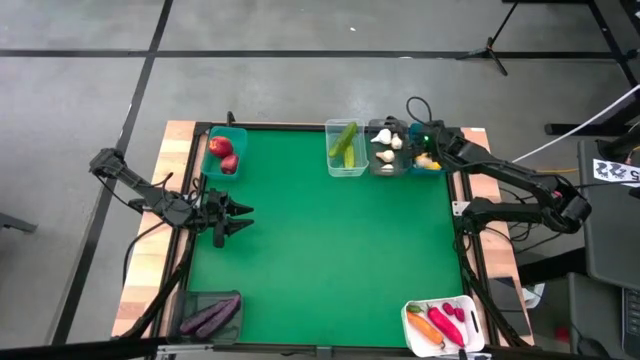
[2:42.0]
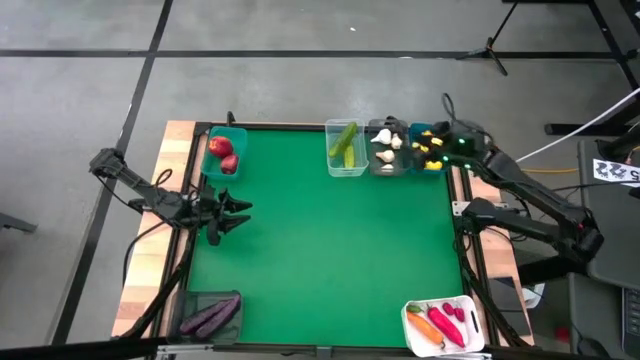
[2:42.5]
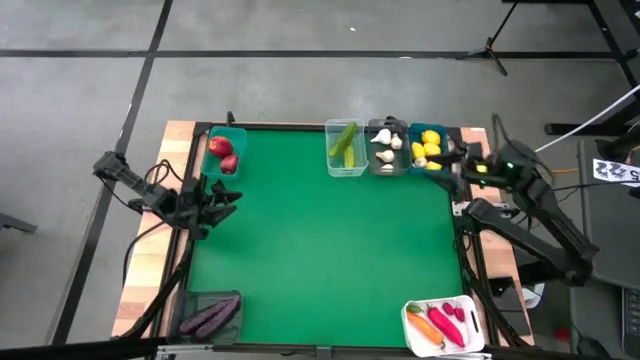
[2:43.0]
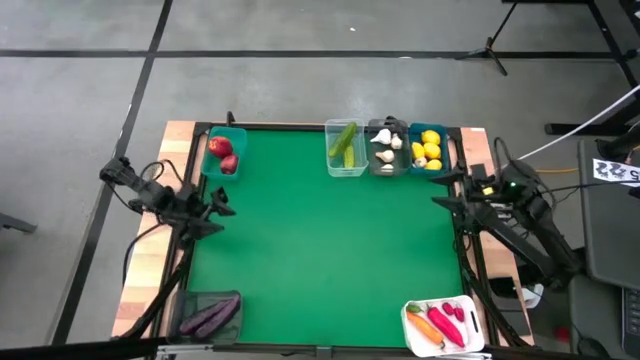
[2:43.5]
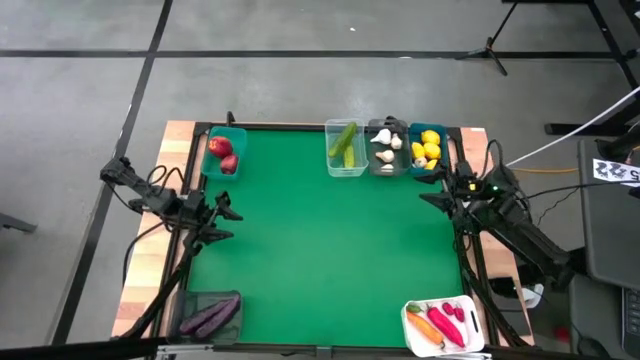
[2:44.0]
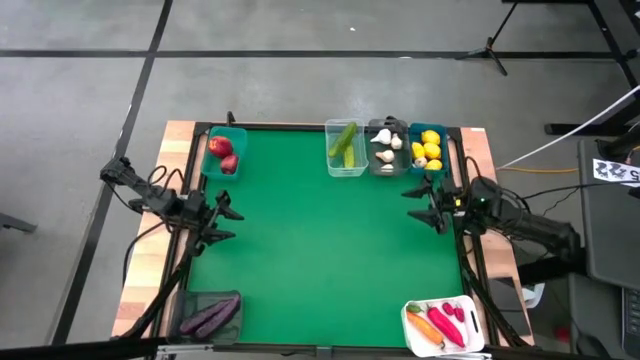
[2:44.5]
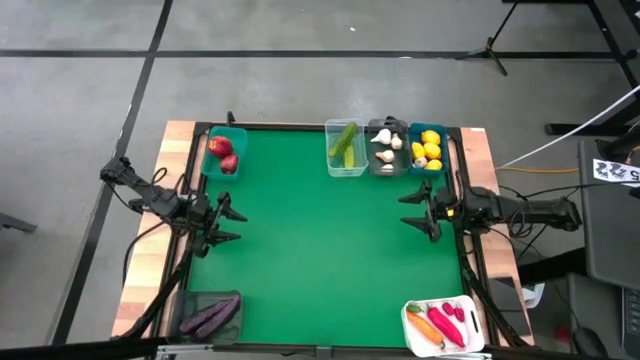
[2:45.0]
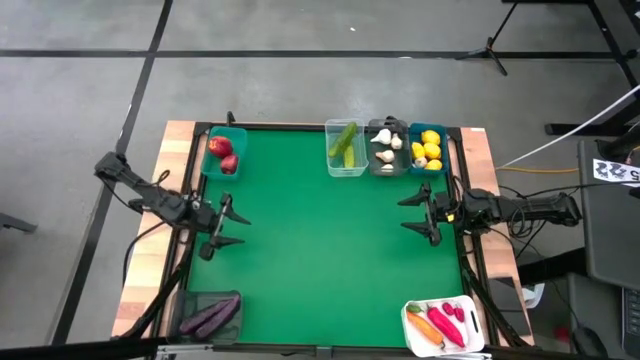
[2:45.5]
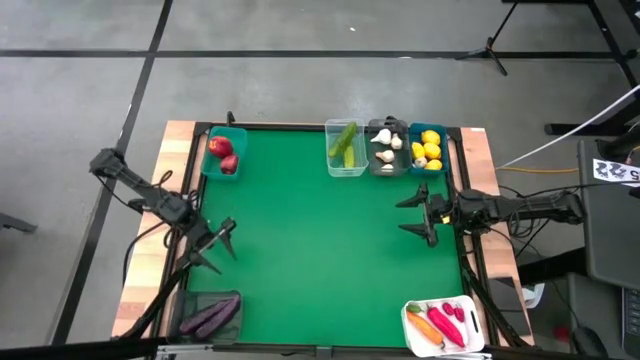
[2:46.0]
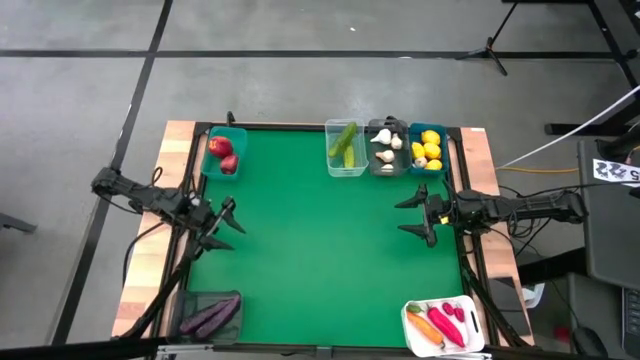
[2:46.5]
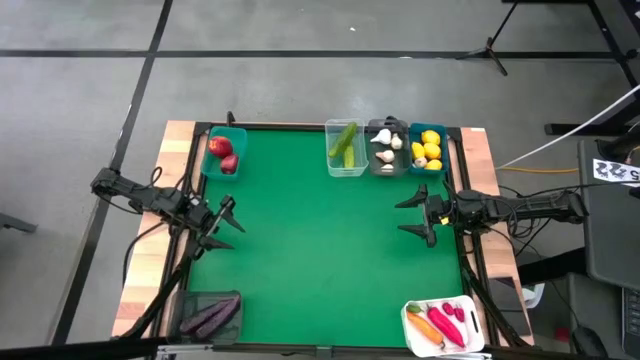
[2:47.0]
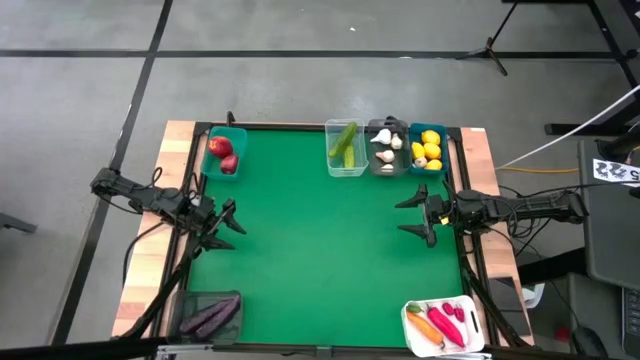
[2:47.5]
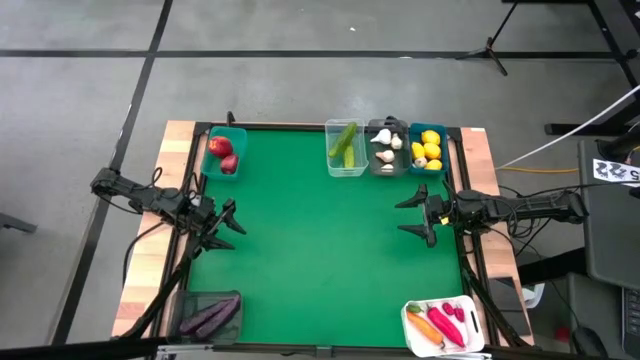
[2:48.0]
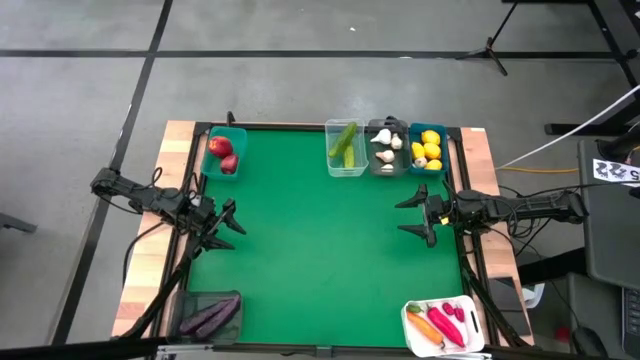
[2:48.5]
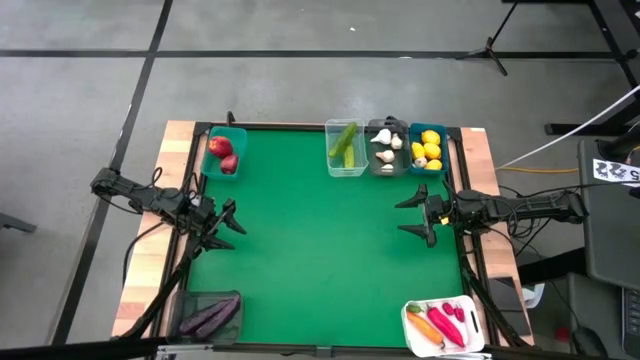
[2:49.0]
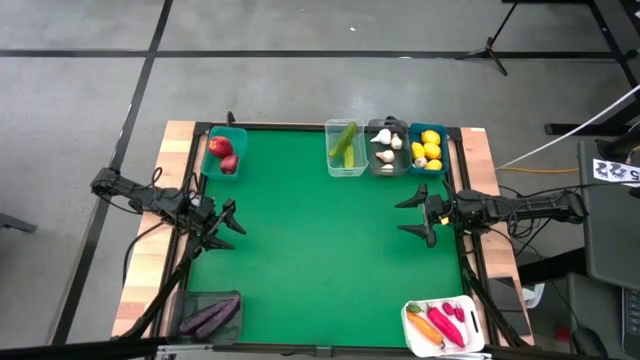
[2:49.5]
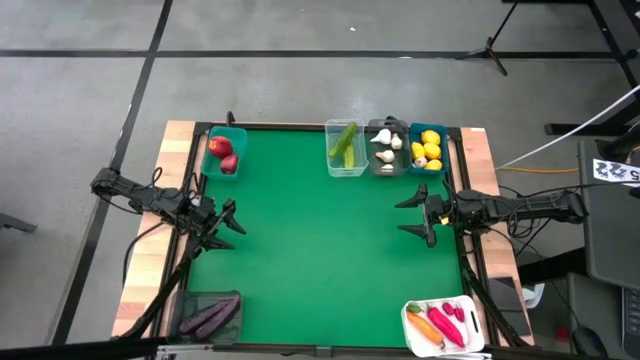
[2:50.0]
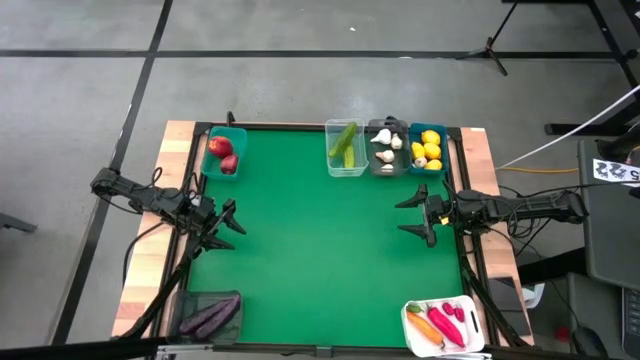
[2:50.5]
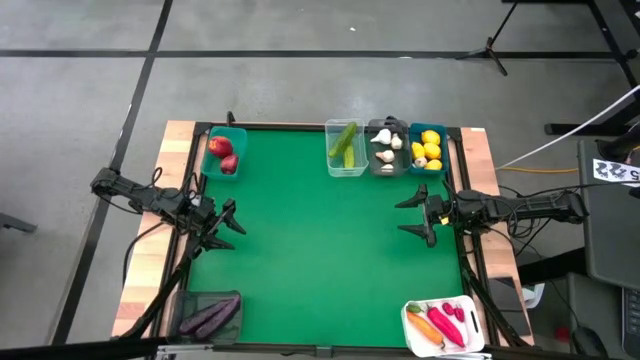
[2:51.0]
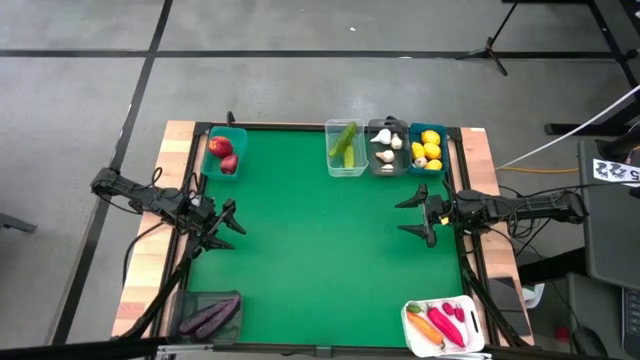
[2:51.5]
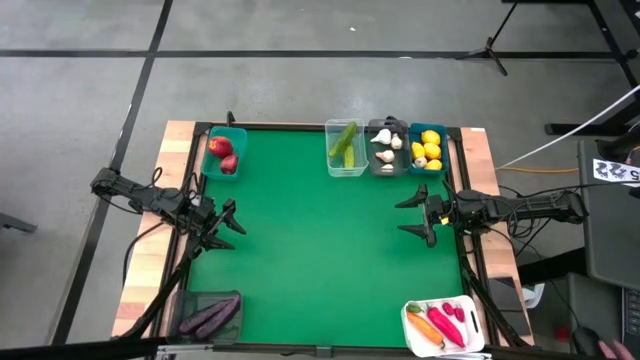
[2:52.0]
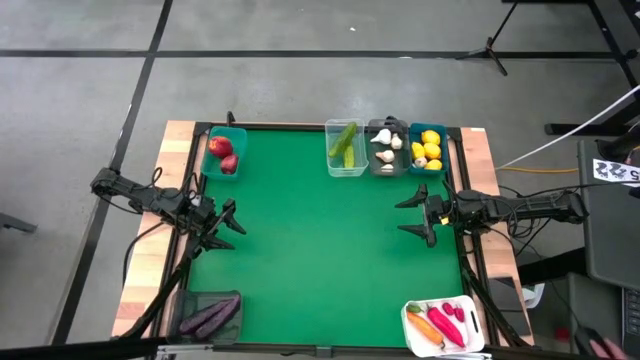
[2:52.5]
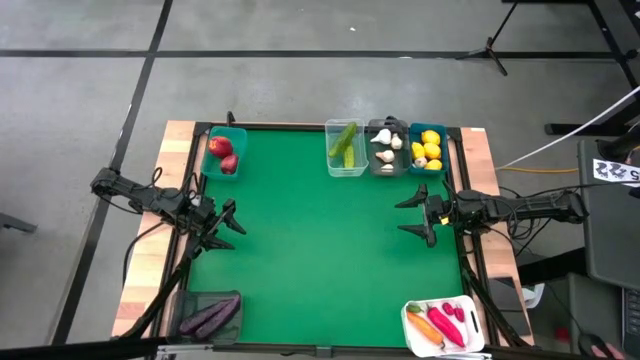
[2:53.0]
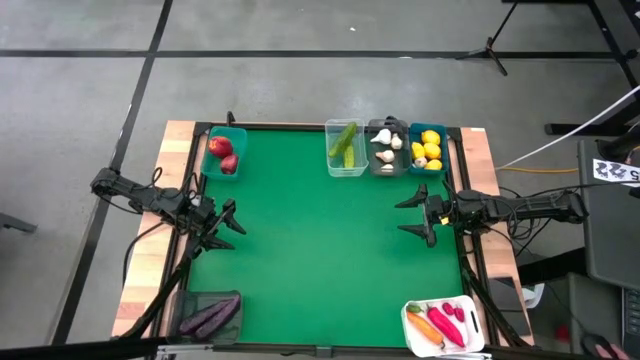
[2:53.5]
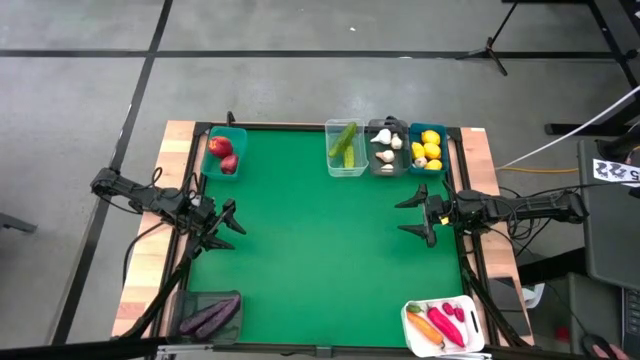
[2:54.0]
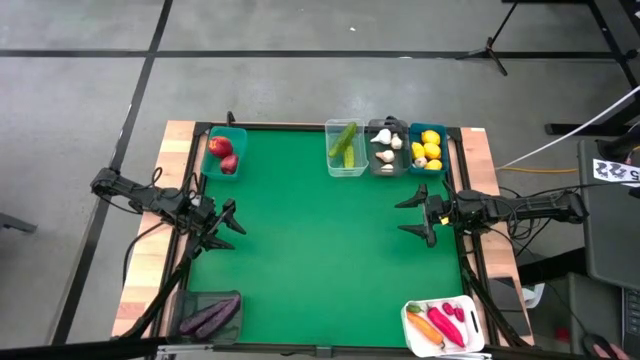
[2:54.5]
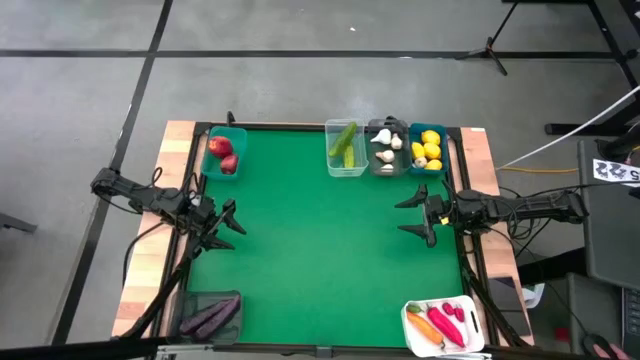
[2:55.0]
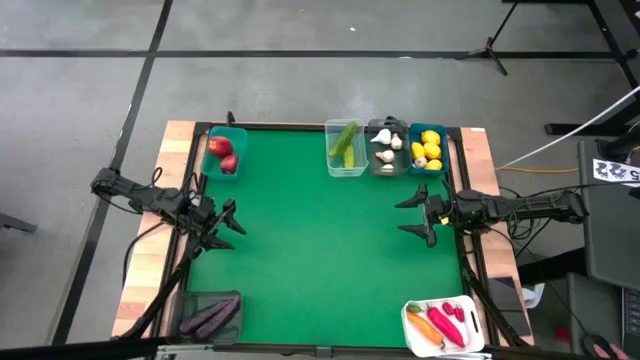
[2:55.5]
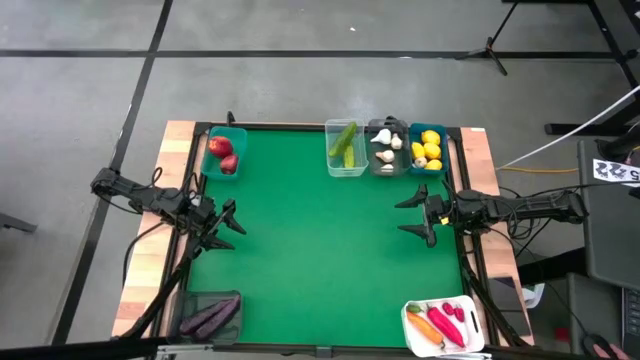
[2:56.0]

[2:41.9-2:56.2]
Task: Sort produce into baskets
Return to Home Position

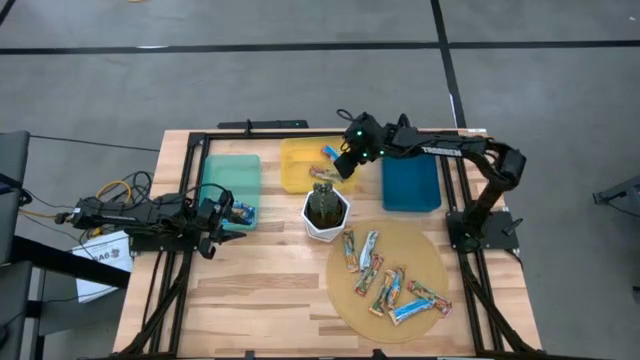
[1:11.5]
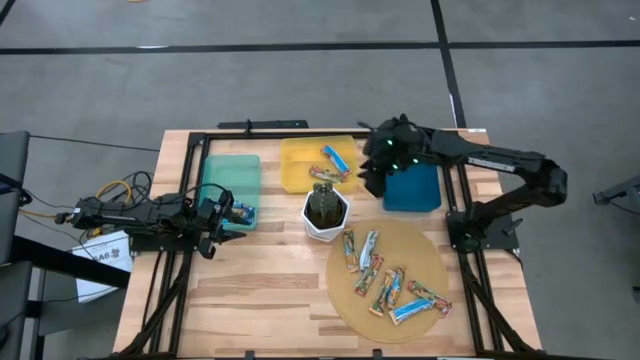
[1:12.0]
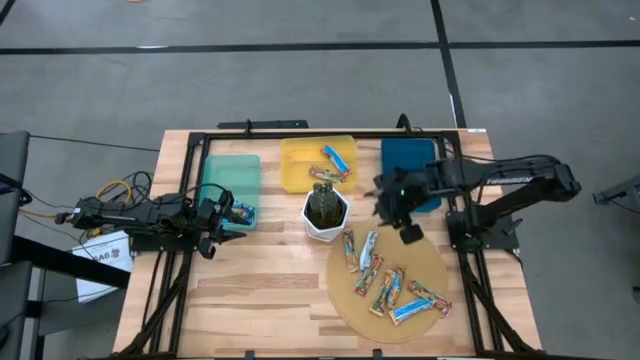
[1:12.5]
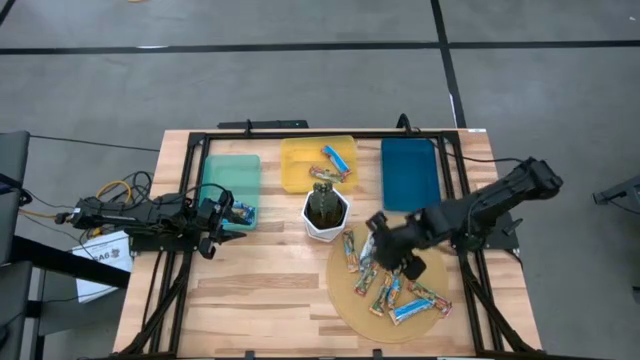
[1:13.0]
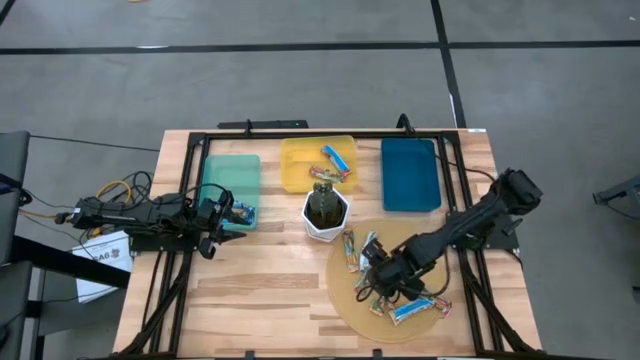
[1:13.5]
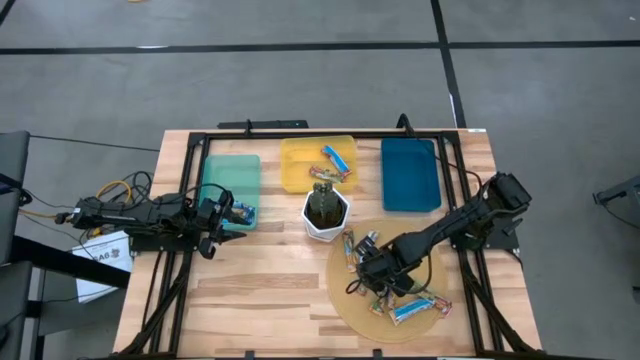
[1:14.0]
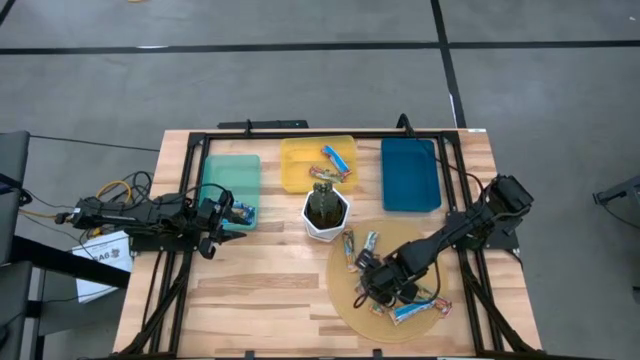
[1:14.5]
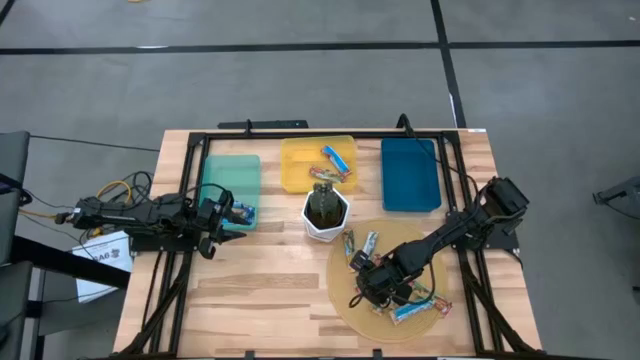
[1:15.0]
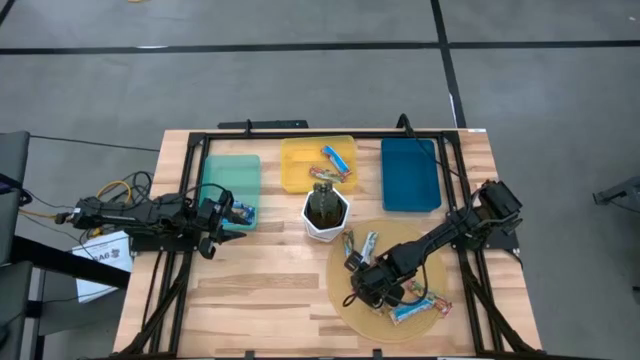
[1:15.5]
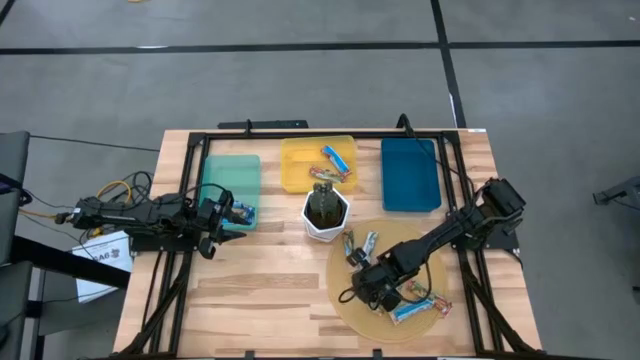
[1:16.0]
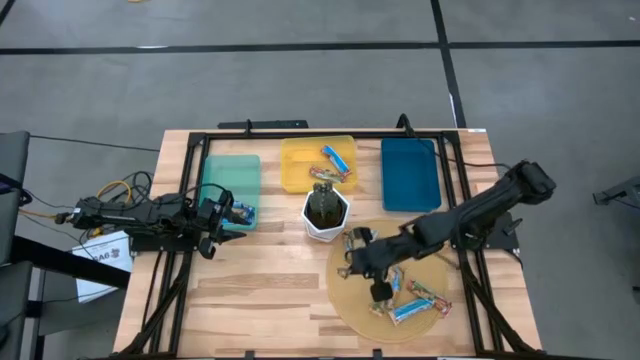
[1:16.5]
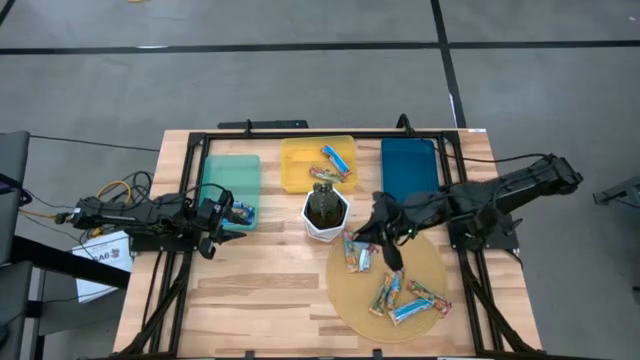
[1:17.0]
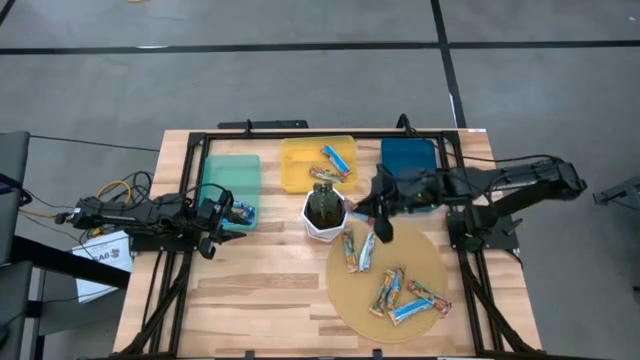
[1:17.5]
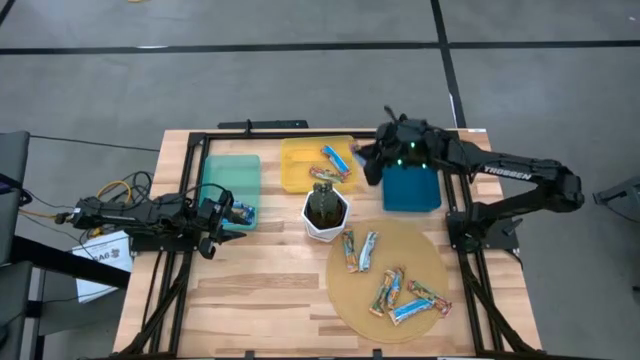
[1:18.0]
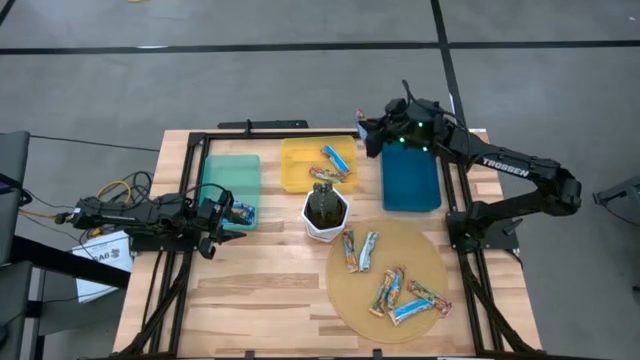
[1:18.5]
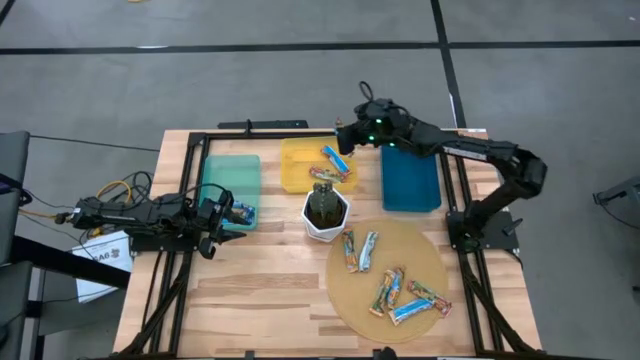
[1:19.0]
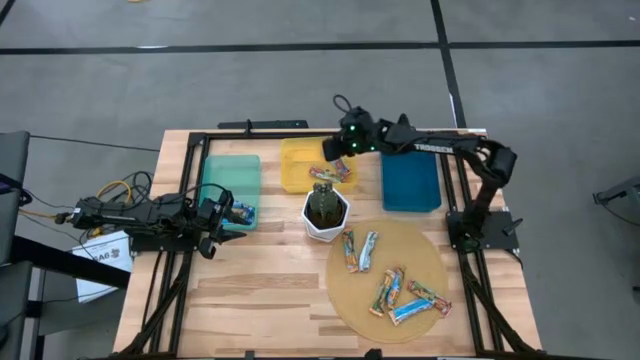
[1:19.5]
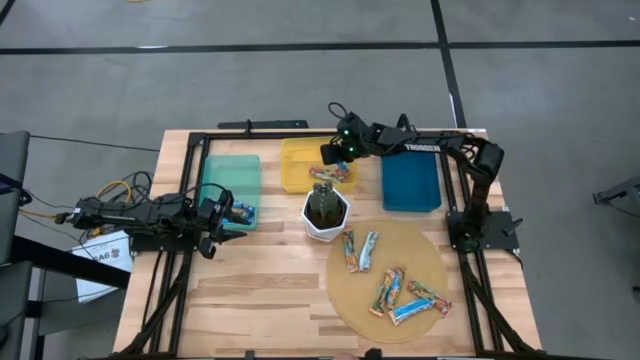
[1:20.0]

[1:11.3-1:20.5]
Task: Pick and place Granola Bars by type
Put the red granola bar into the yellow bin
